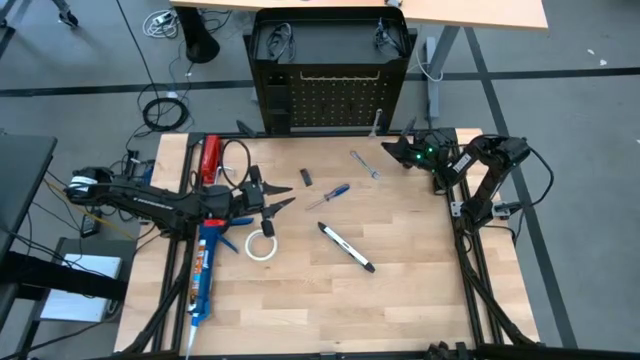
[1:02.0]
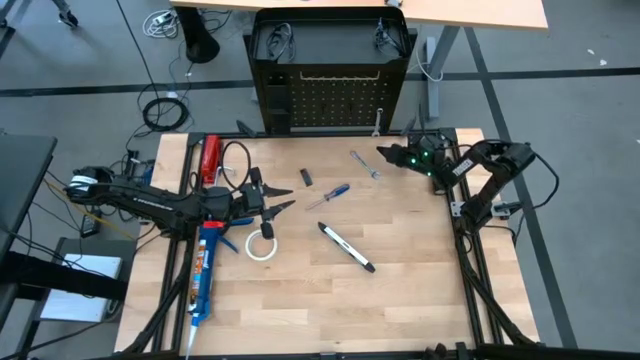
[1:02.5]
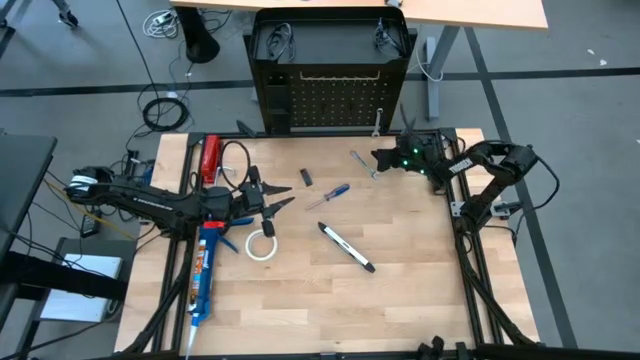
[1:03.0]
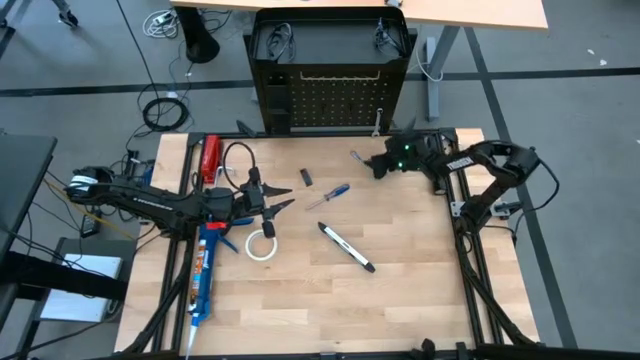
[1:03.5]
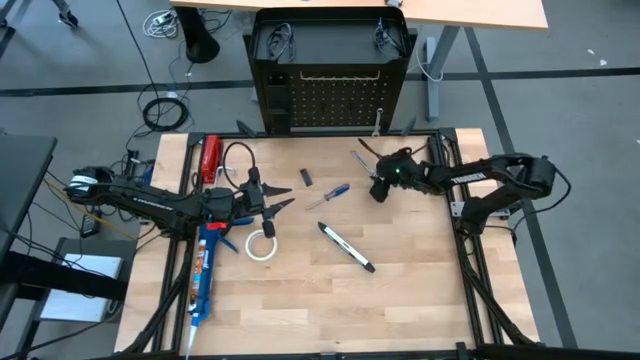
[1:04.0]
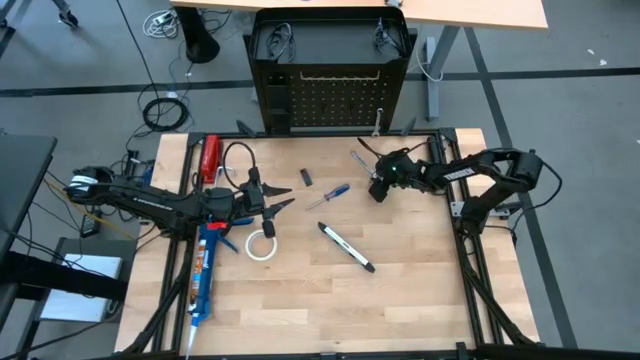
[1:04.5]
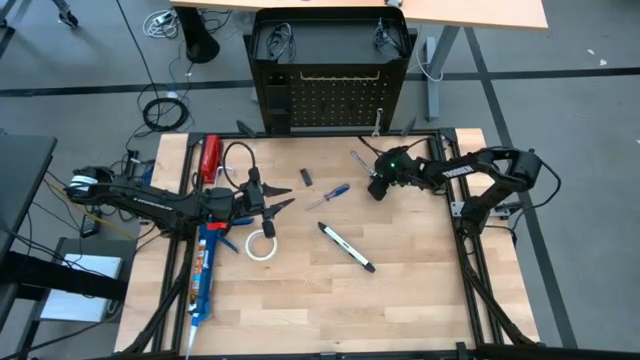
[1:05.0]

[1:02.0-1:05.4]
Task: Hang tools onto peg board
Hang the wrench onto the black pegboard

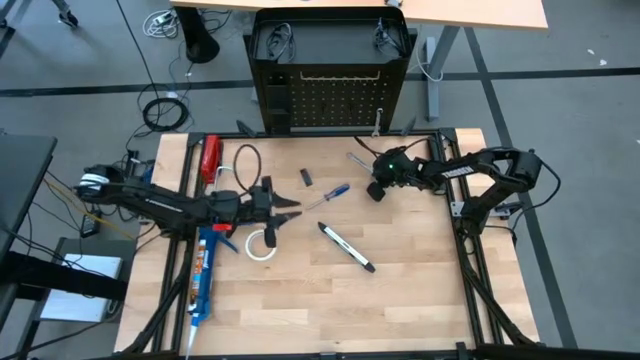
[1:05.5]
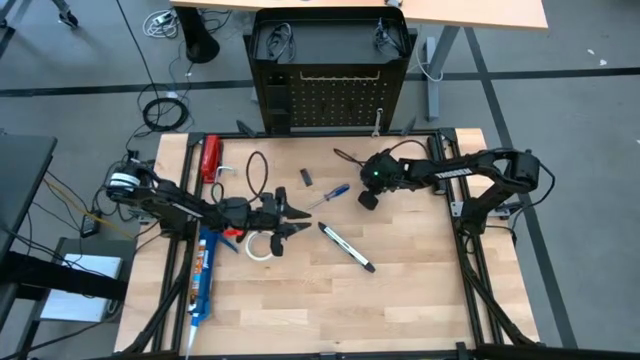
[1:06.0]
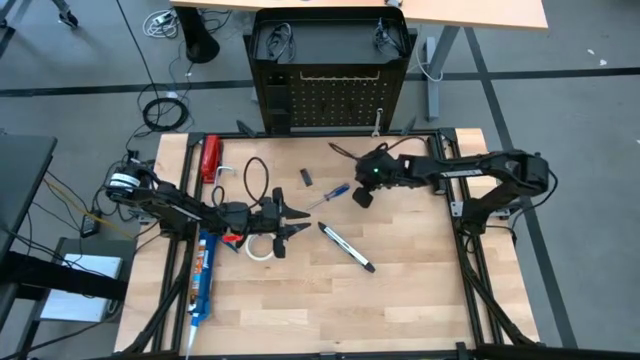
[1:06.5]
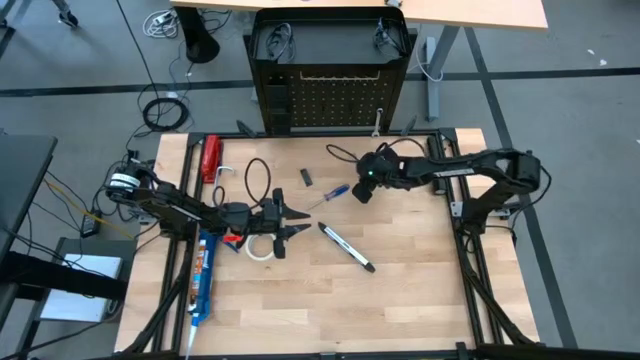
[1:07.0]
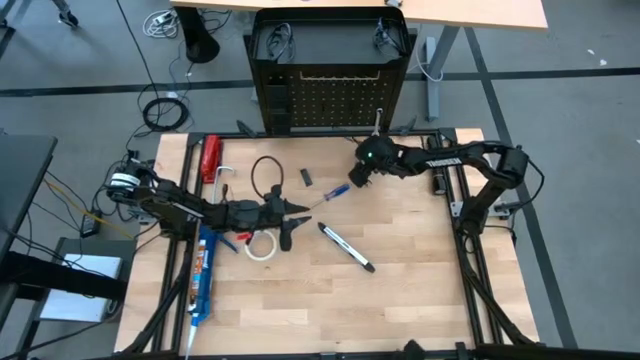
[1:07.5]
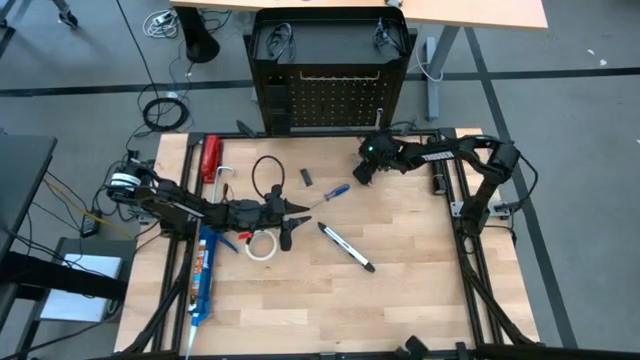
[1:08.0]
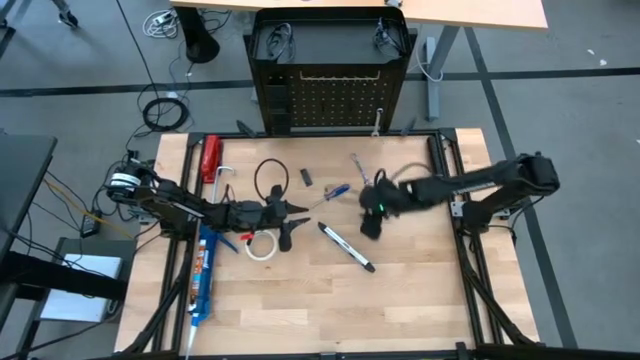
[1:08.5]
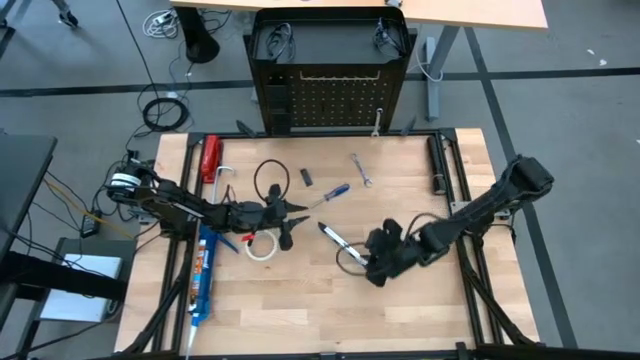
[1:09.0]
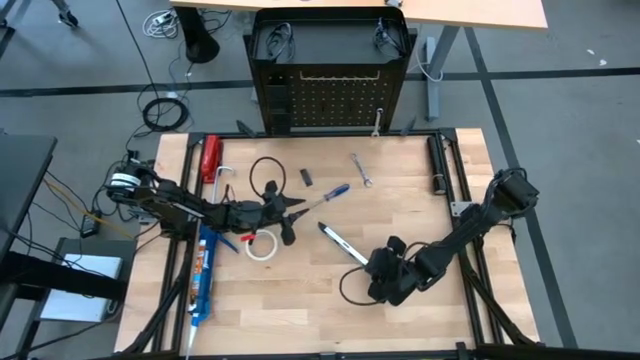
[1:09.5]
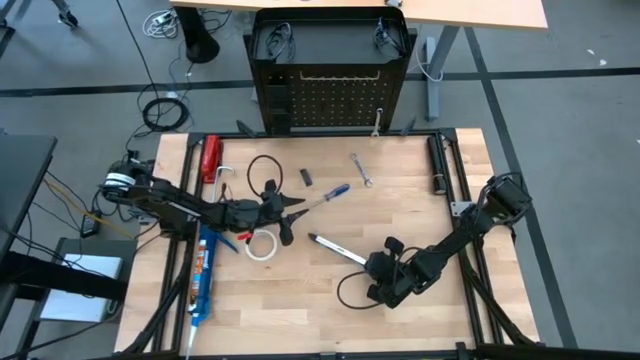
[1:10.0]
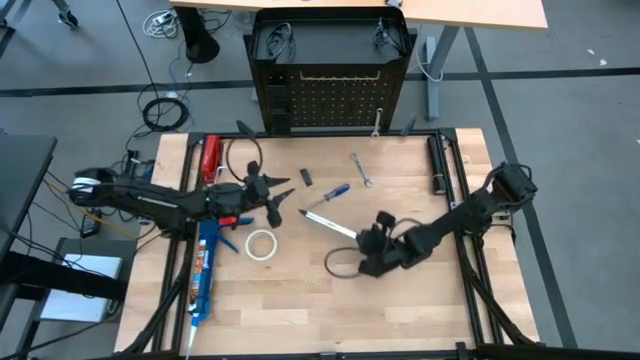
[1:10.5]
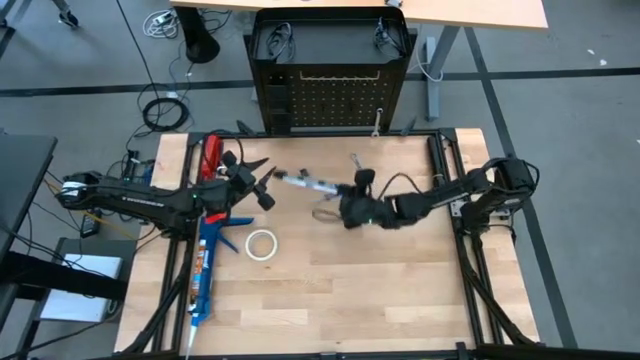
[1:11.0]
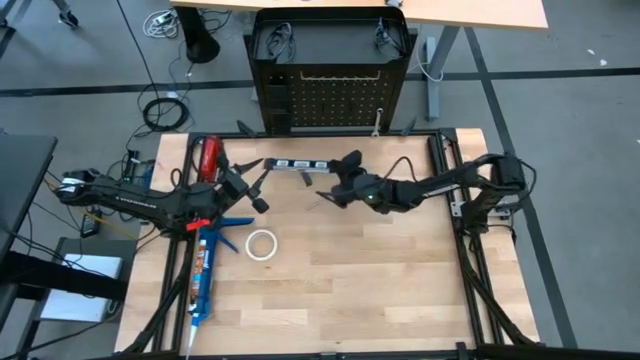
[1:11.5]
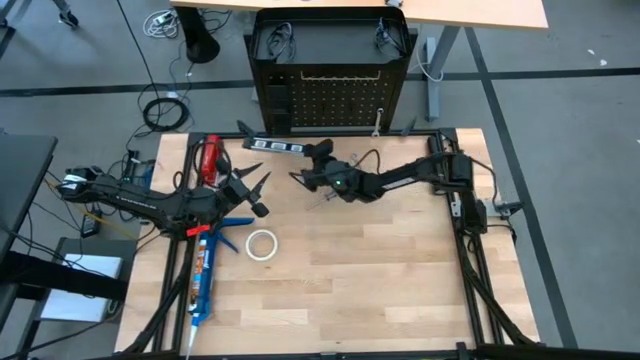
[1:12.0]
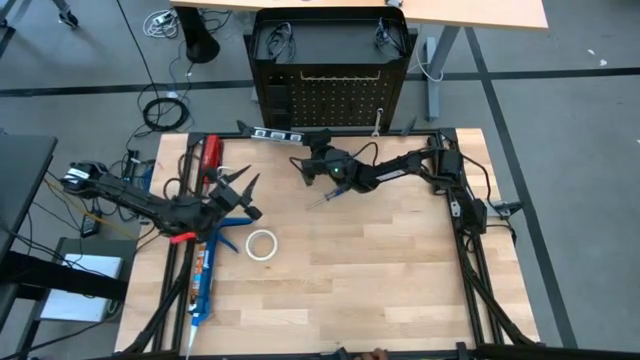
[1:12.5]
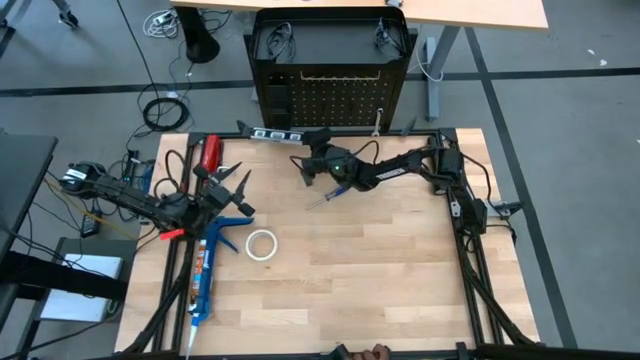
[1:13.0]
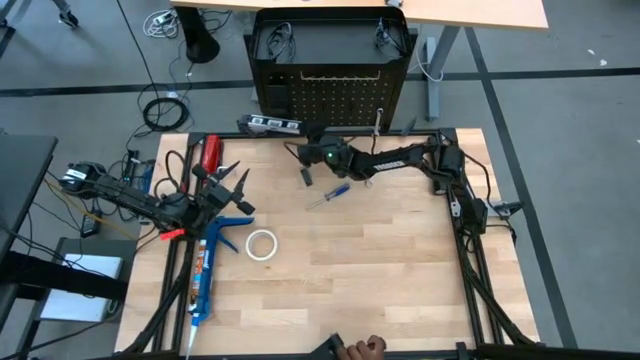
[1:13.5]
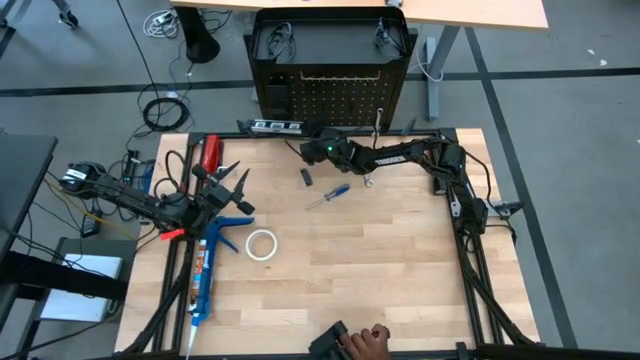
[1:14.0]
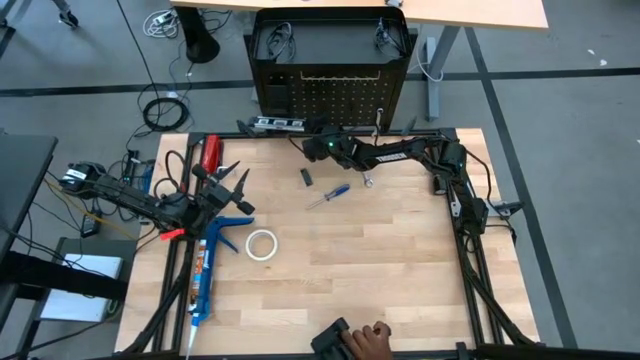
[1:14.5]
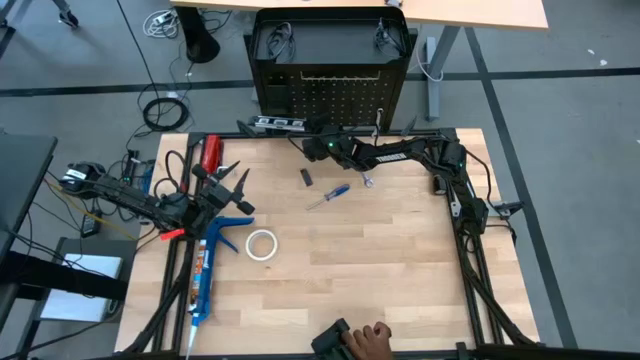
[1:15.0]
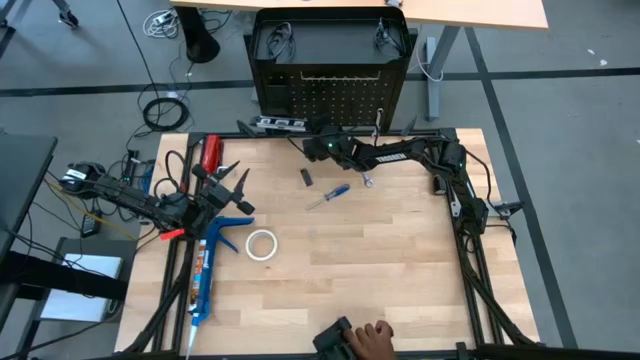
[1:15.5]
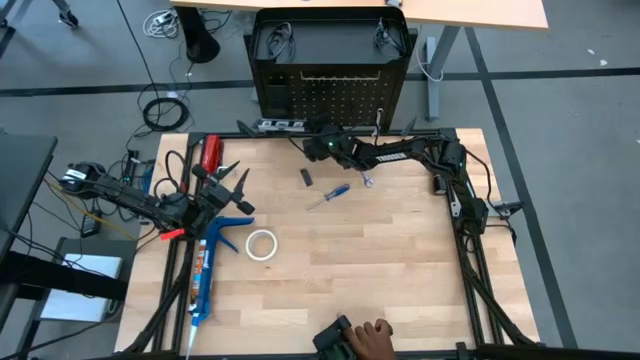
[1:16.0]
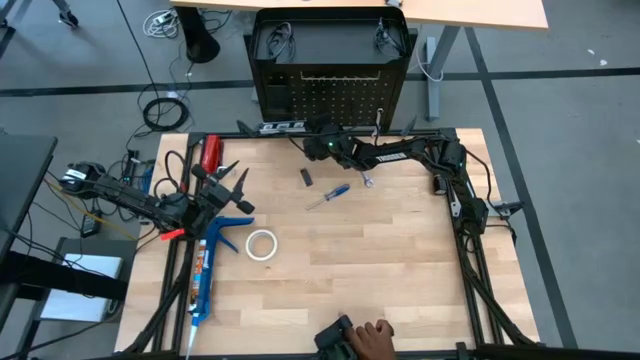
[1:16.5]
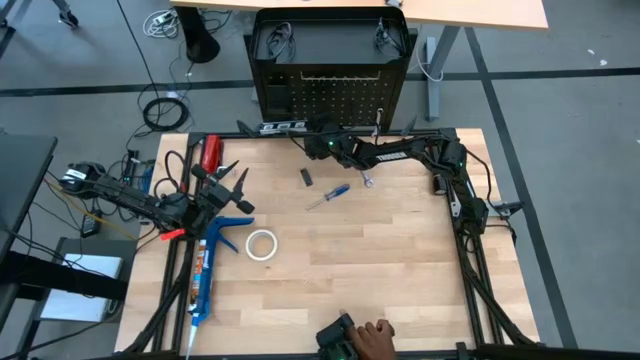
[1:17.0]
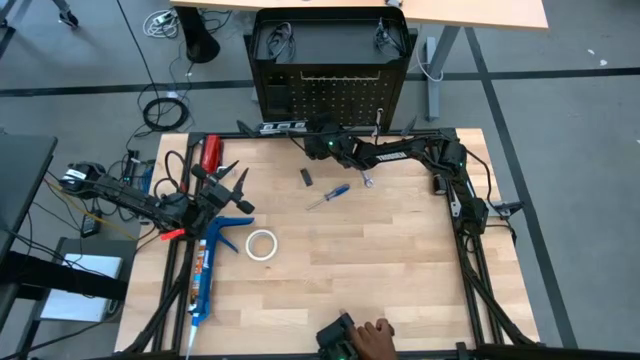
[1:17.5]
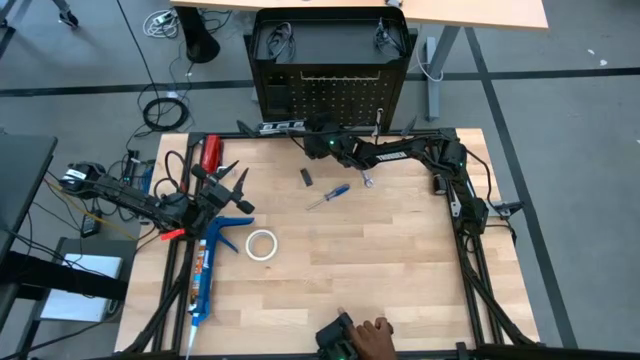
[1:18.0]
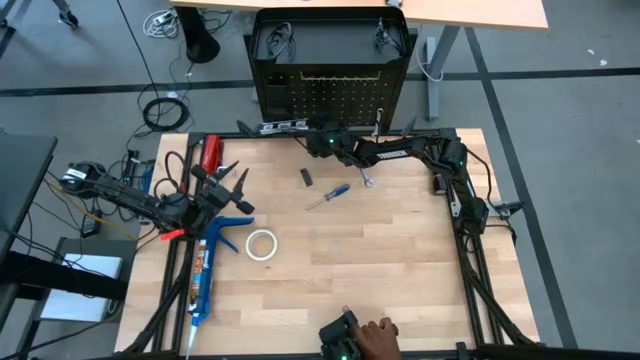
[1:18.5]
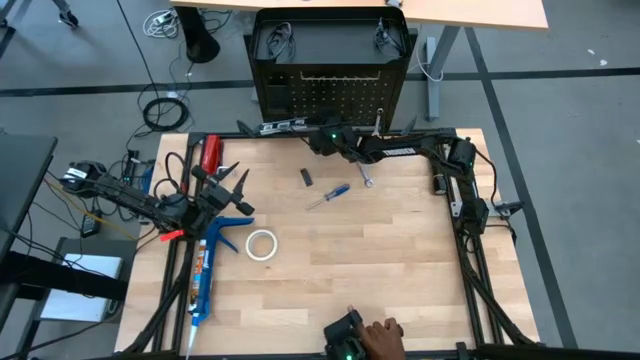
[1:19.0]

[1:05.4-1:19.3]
Put the spirit level onto the black pegboard

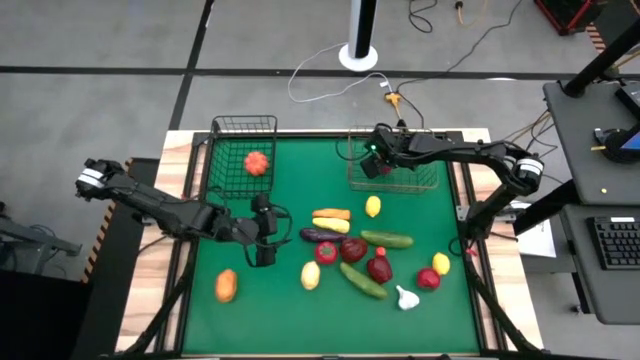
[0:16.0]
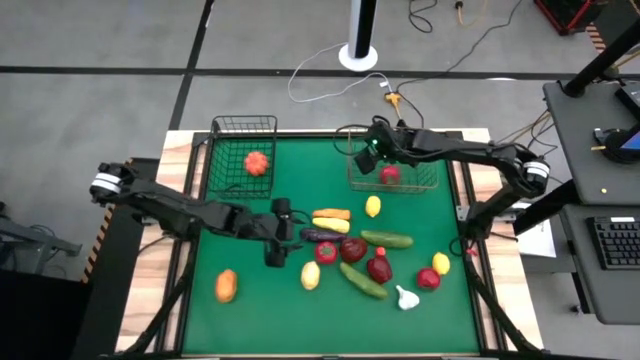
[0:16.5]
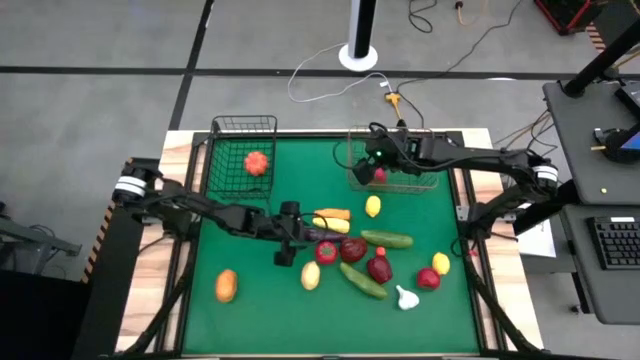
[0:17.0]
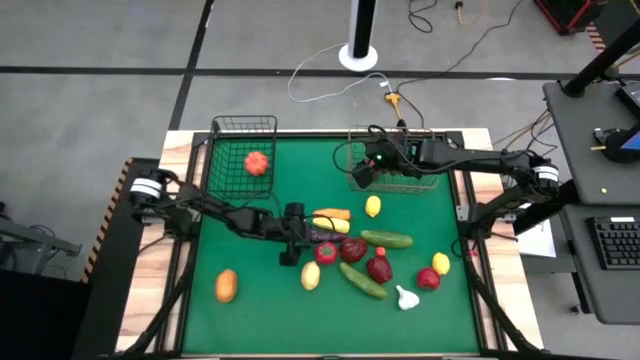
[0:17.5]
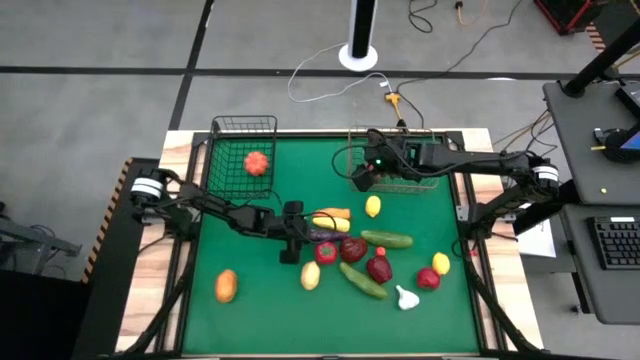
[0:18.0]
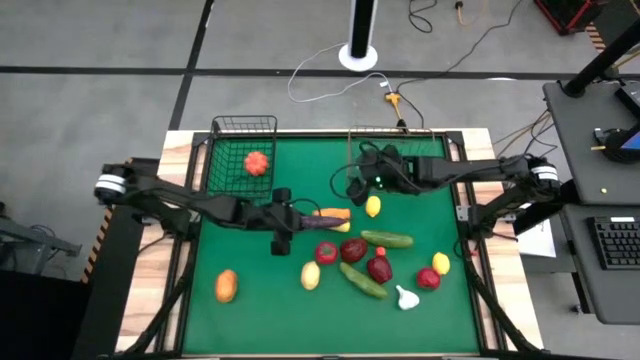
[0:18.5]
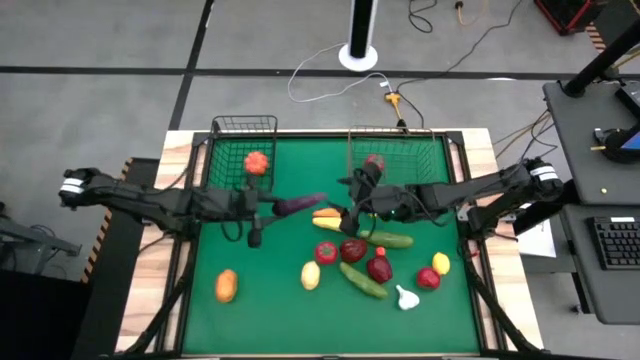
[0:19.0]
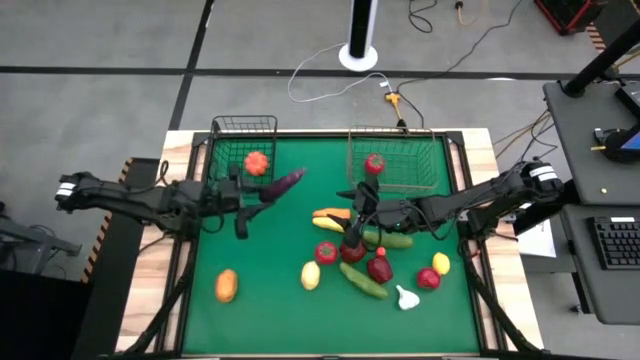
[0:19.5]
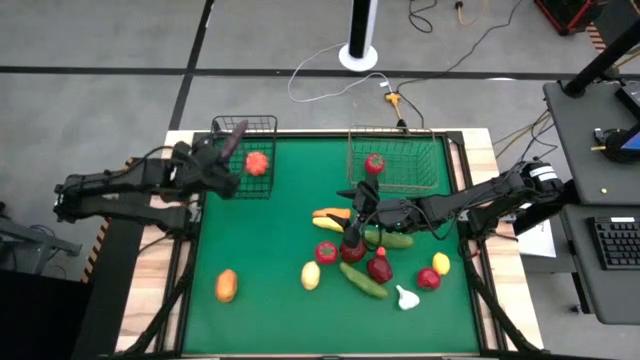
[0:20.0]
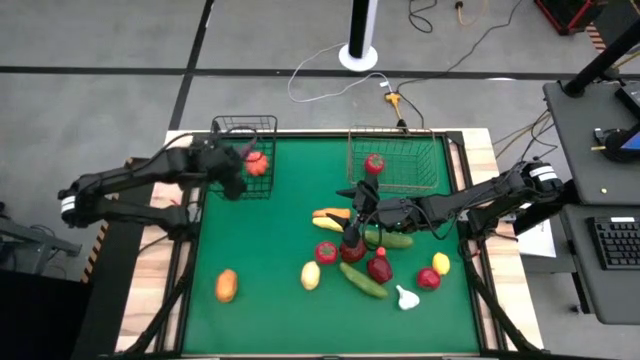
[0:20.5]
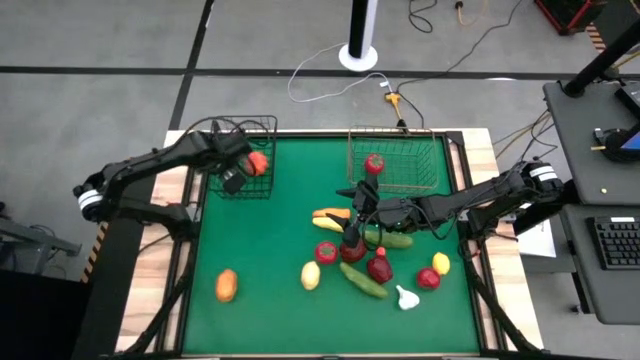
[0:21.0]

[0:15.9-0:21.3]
Task: Sort produce into baskets
Put the purple eggplant into the left wire basket
